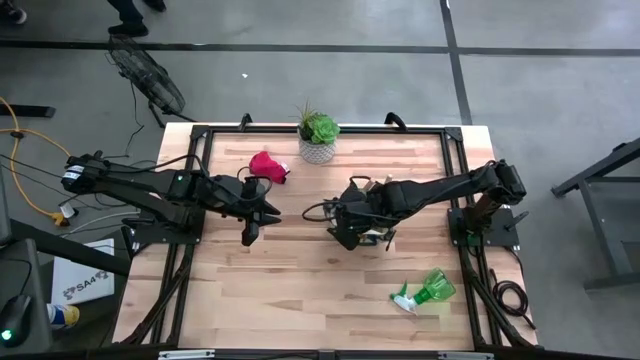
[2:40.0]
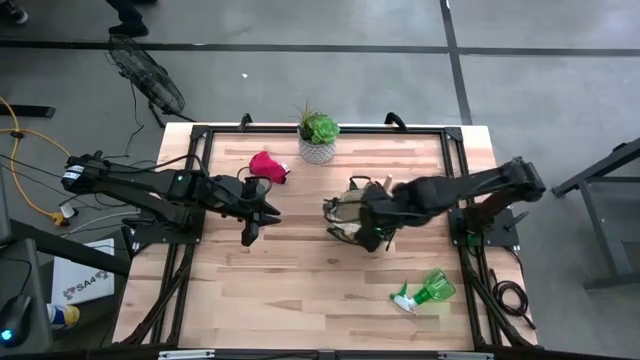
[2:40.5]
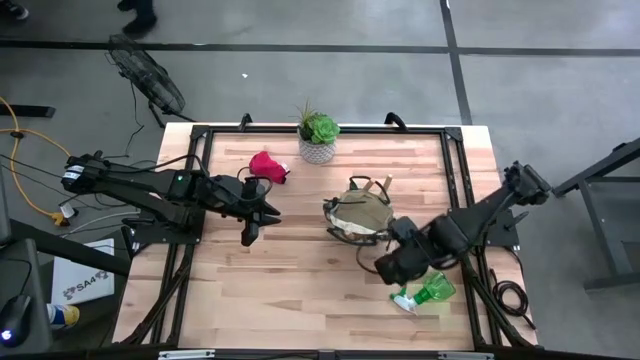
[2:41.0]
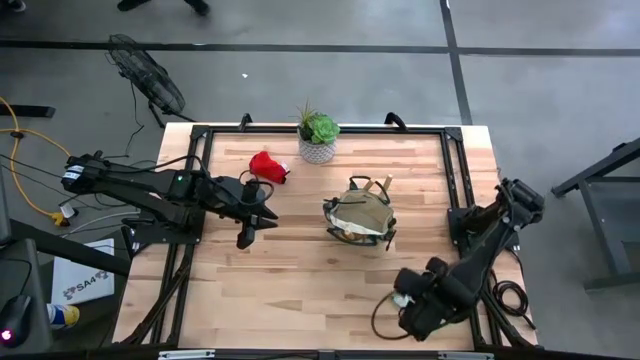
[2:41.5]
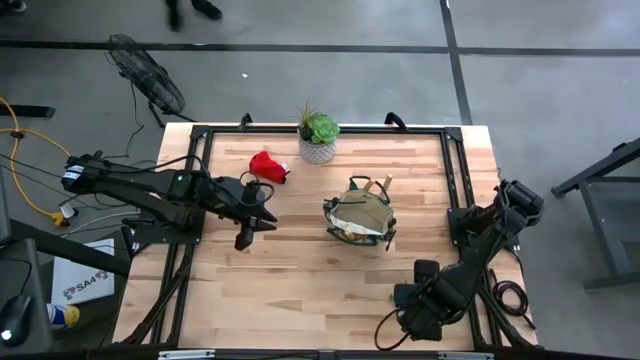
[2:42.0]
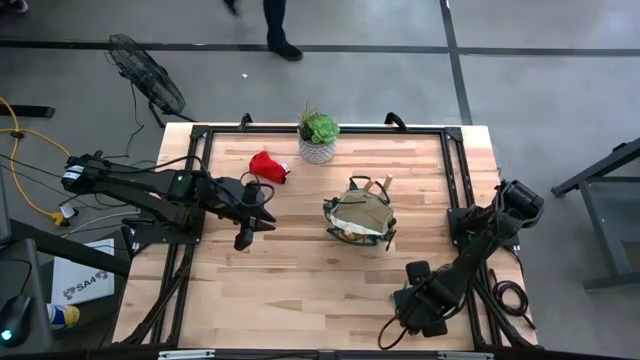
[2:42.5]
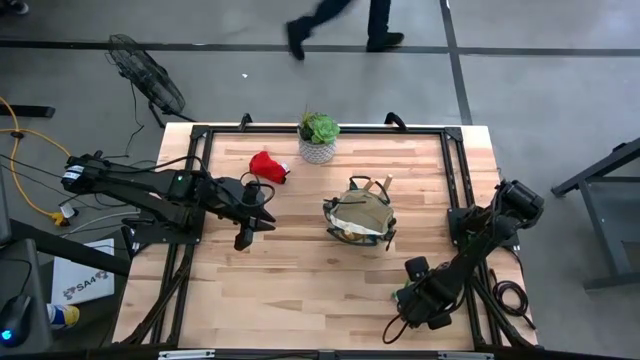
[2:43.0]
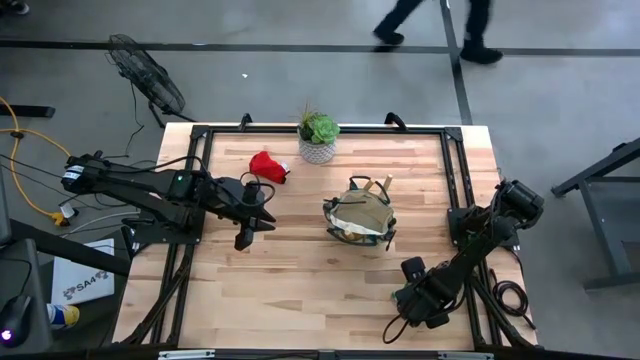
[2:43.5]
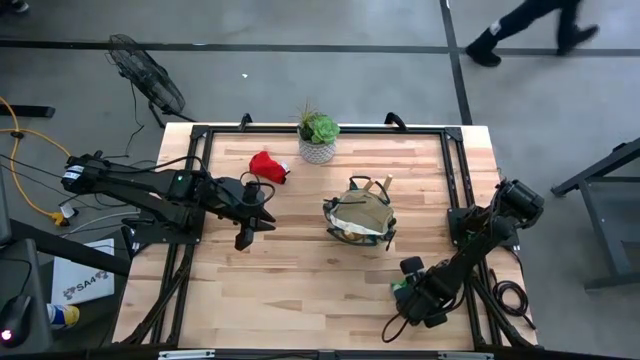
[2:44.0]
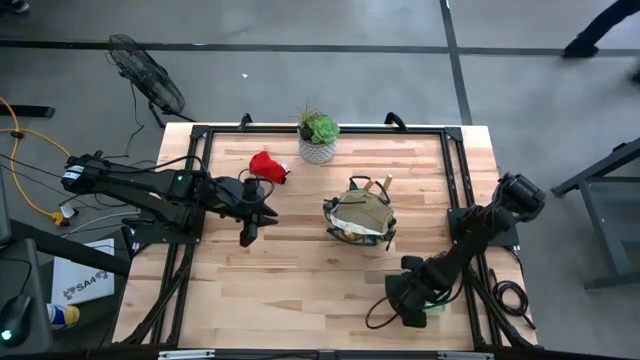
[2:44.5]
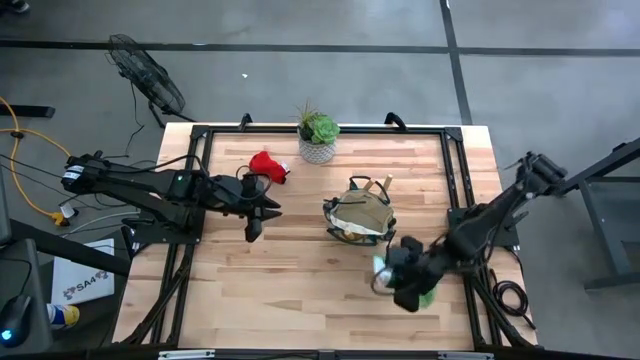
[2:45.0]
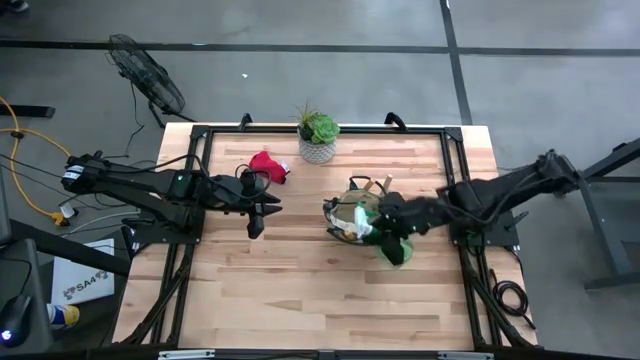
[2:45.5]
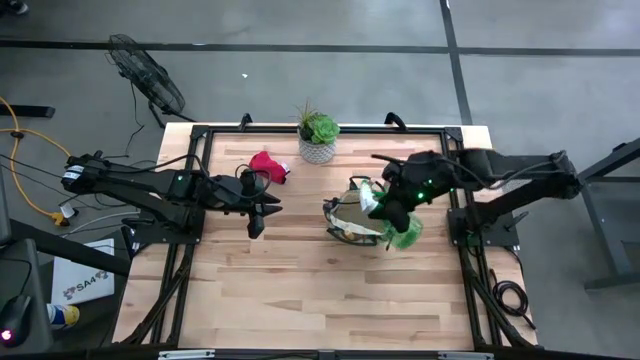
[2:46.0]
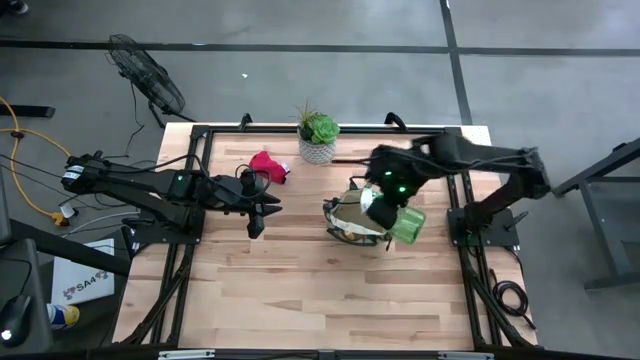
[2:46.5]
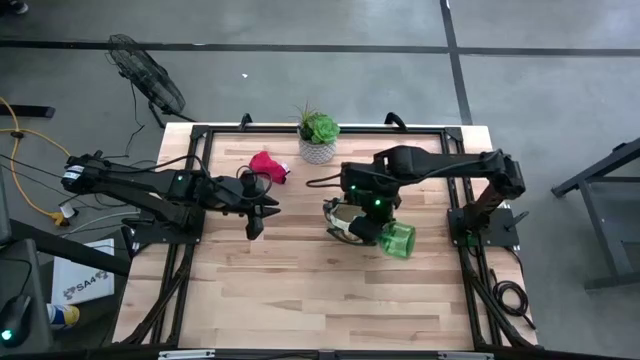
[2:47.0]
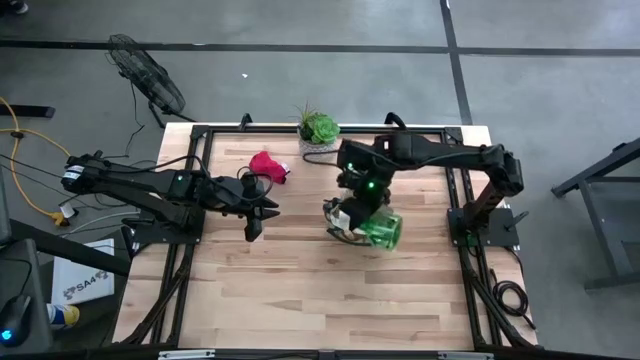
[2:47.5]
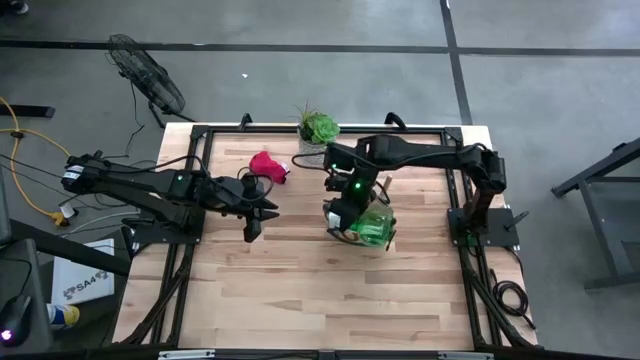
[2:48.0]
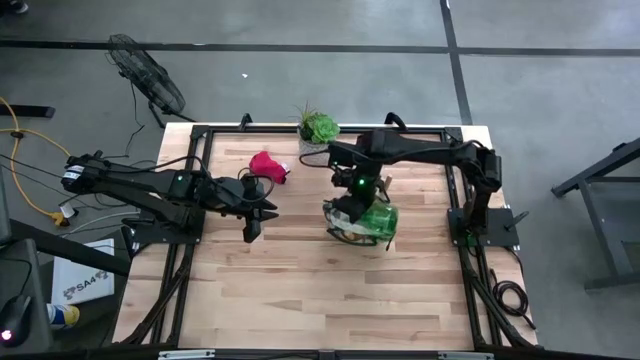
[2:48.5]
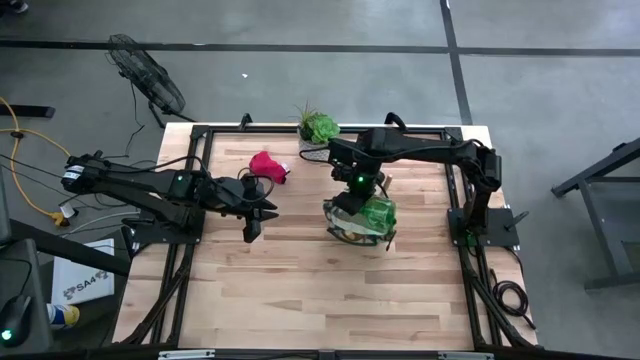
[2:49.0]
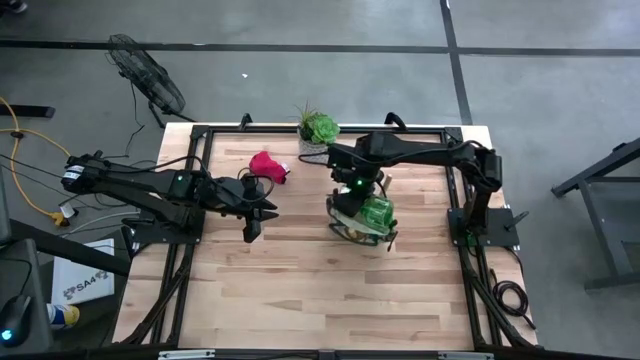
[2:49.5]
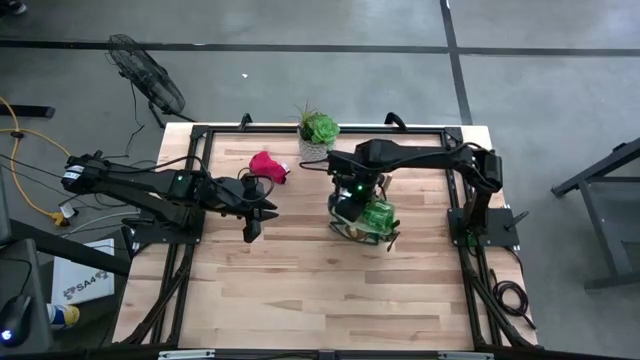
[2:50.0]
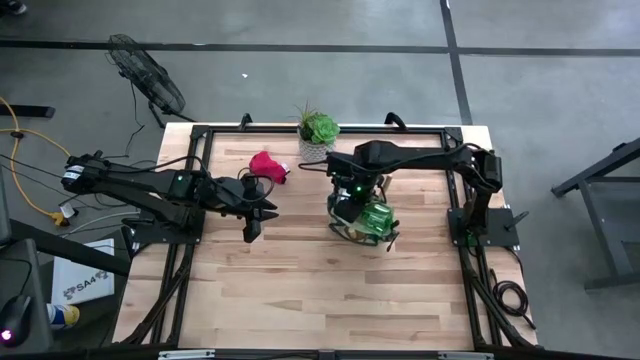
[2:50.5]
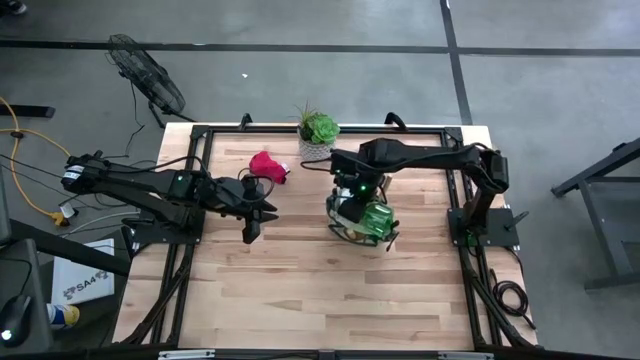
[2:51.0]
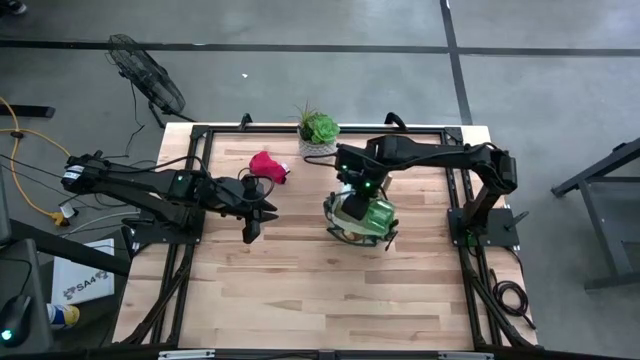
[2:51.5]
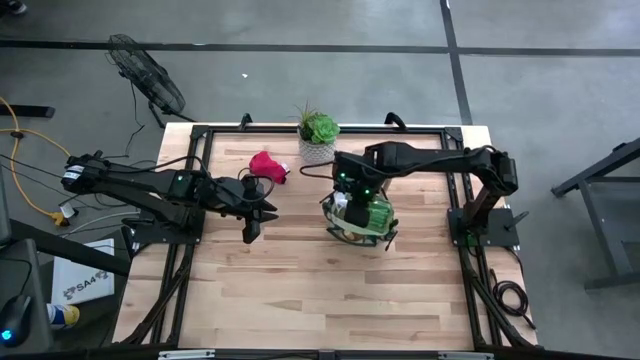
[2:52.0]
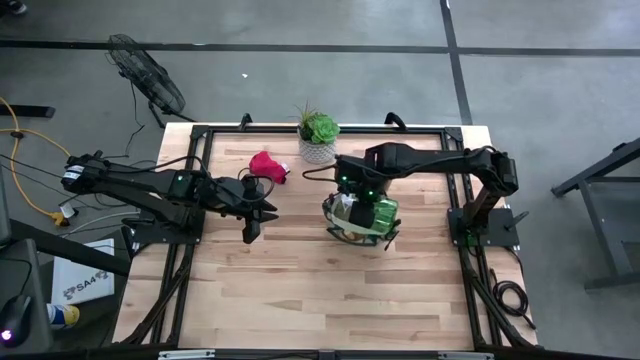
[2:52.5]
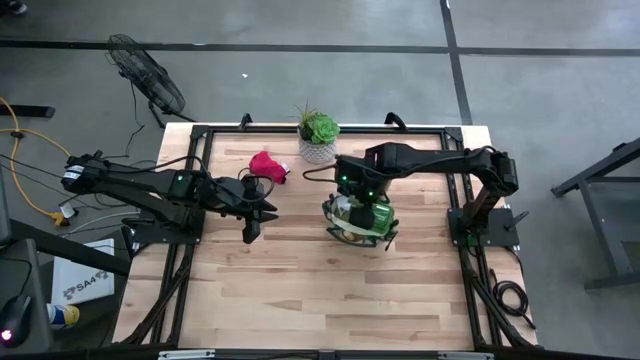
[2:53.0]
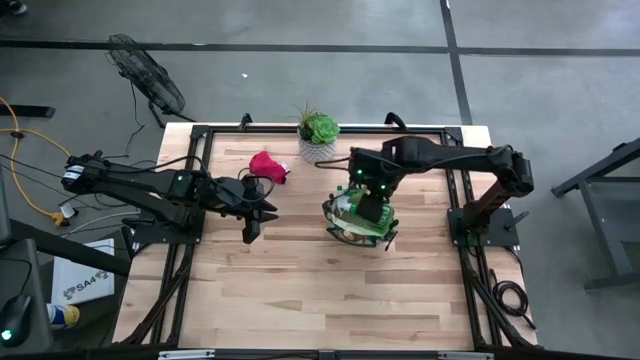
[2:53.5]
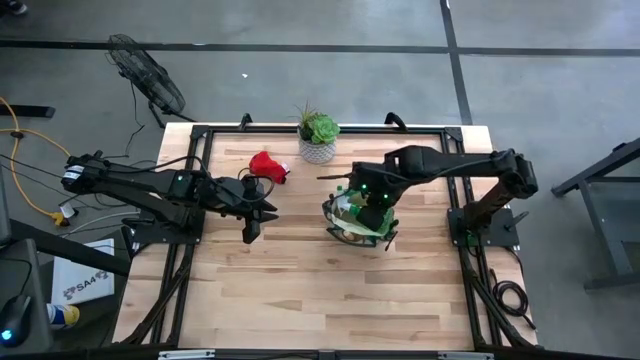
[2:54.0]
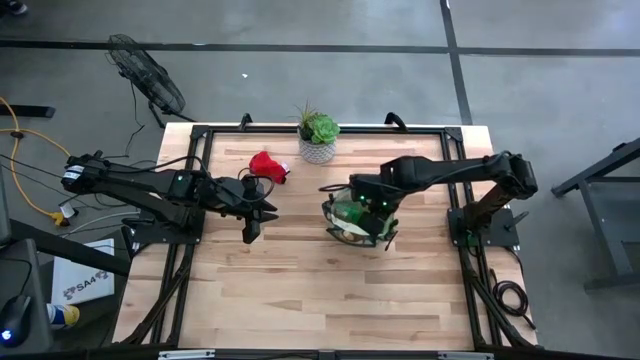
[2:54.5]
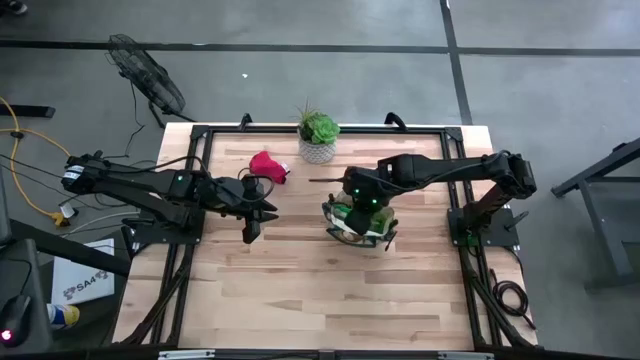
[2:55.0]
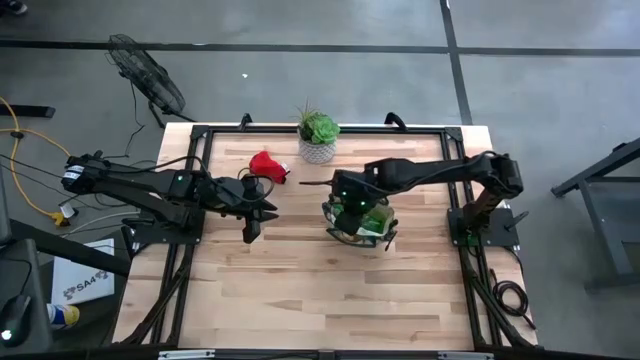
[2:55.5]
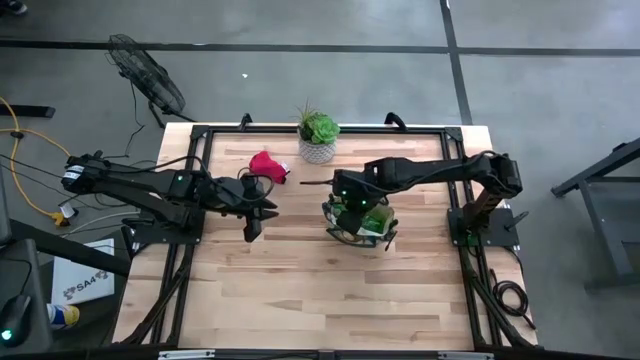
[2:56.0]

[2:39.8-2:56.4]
Task: Pick & Place Garden tools in Gardening bag
Put the green spray bottle into the gardening bag

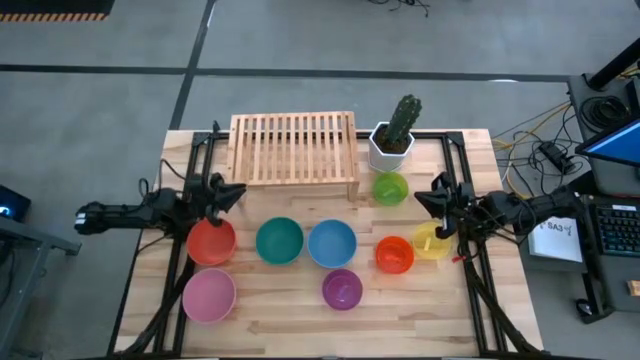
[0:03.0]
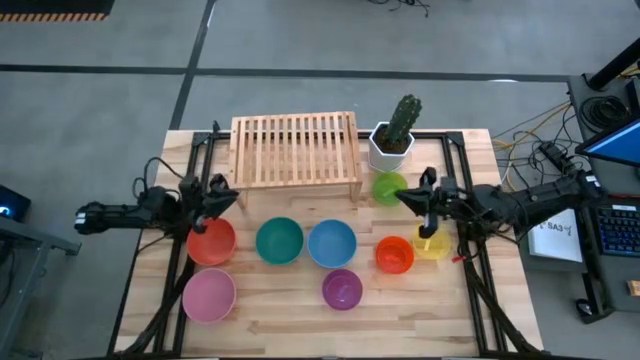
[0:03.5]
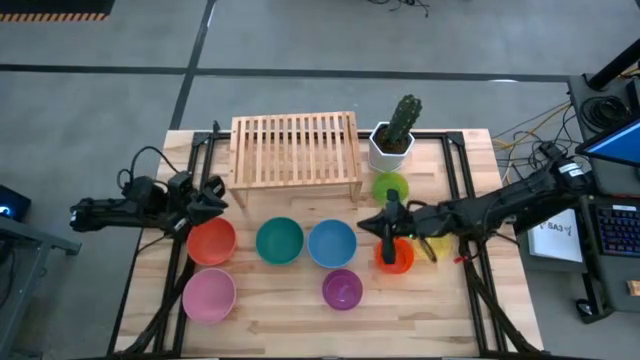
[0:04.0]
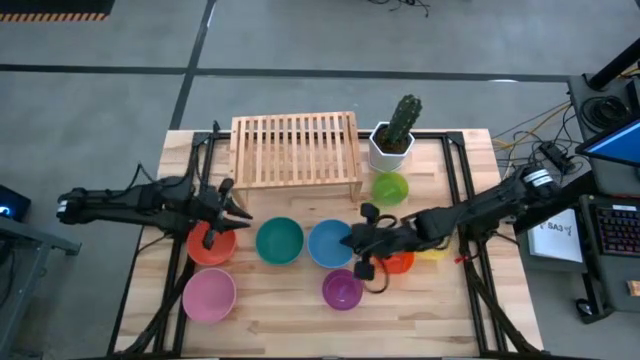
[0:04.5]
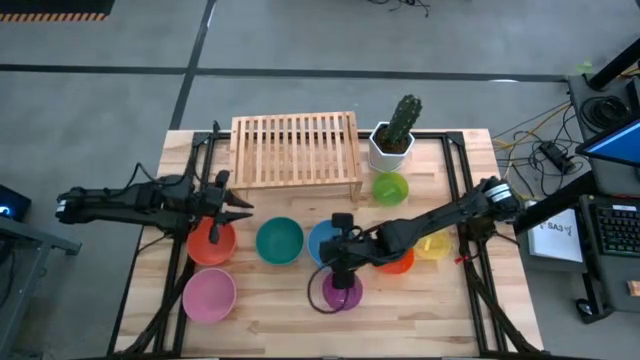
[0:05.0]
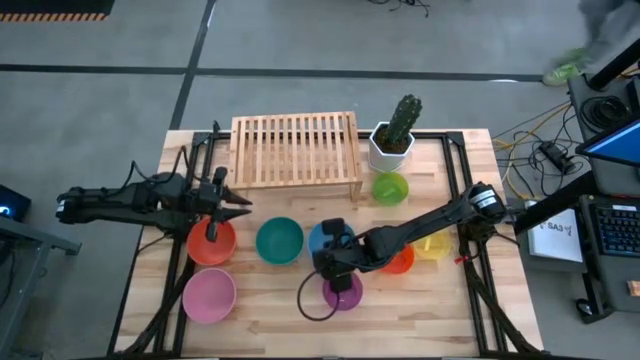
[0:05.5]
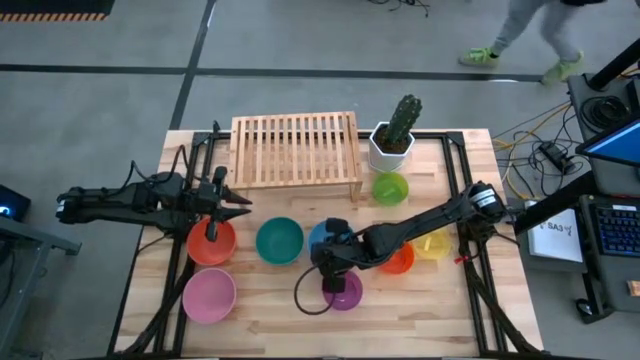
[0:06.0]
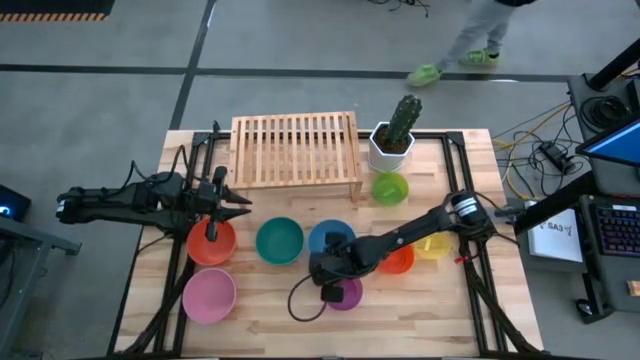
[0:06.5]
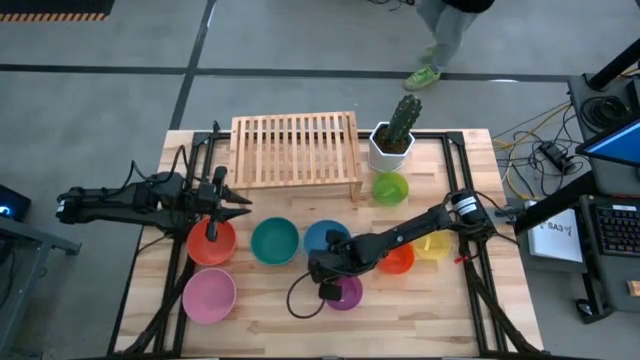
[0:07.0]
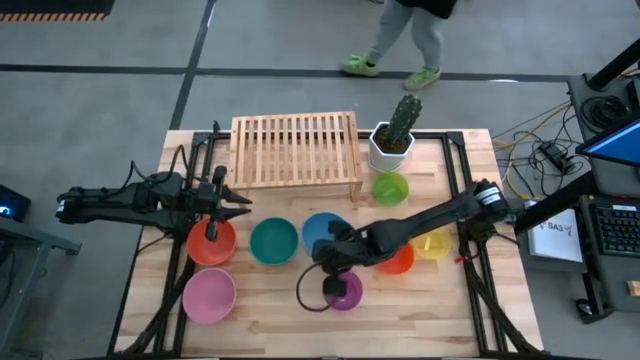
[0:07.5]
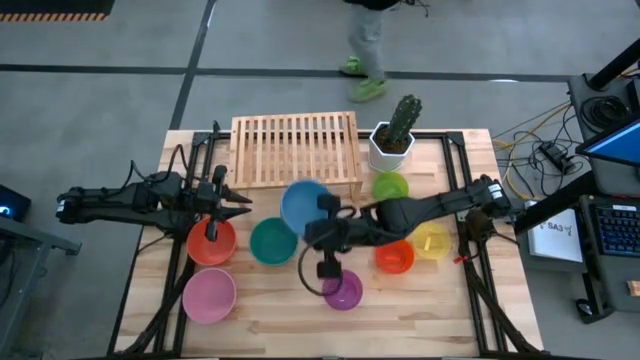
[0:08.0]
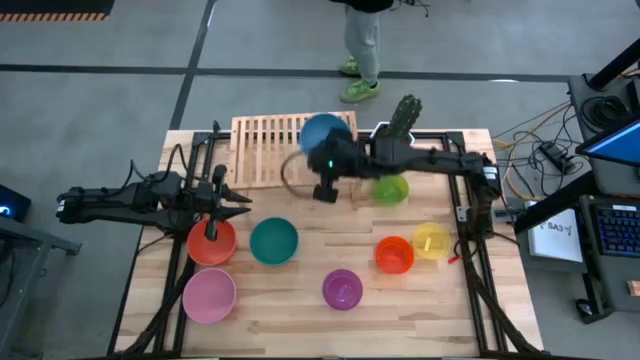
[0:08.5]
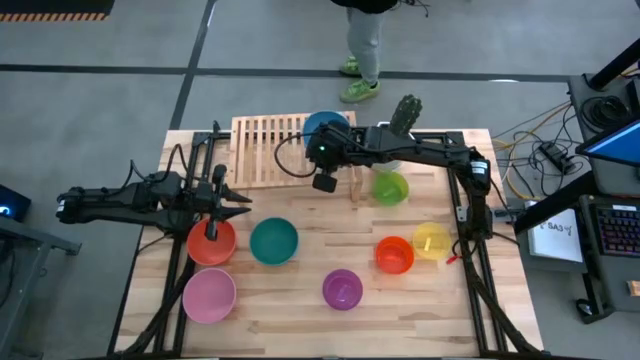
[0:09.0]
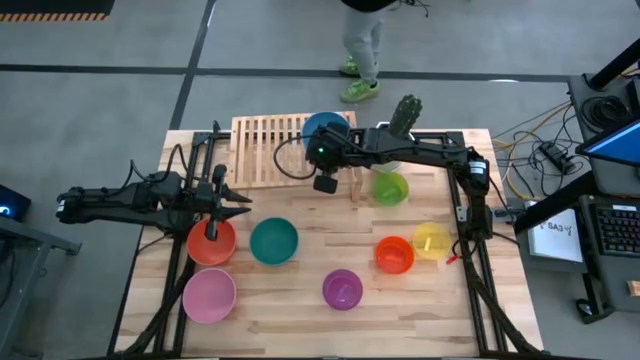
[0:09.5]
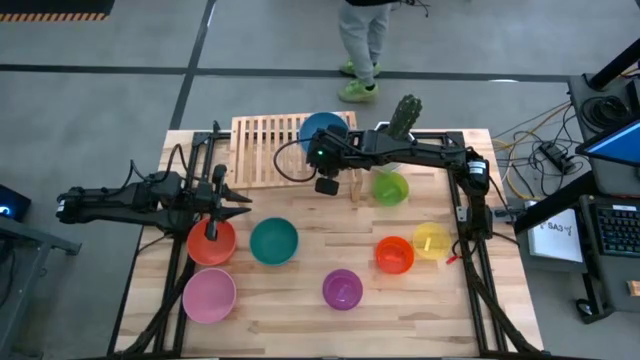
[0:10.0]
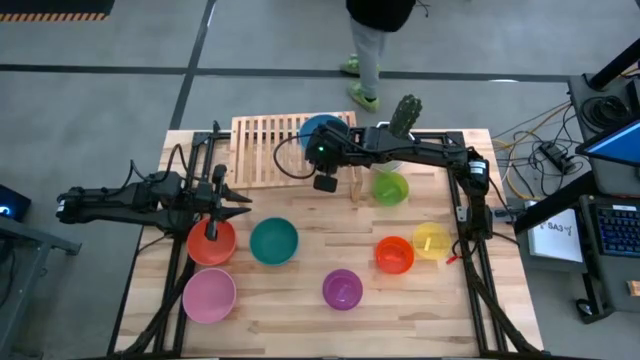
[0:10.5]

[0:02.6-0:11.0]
Task: Place and stack bowls onto a shelf
Put the blue bowl on the shelf
